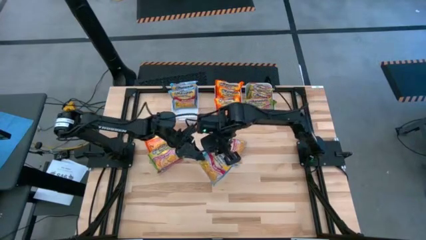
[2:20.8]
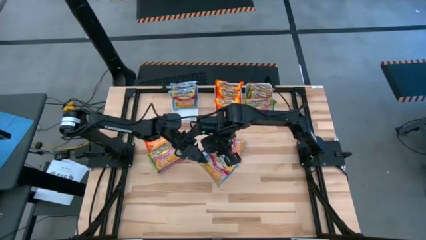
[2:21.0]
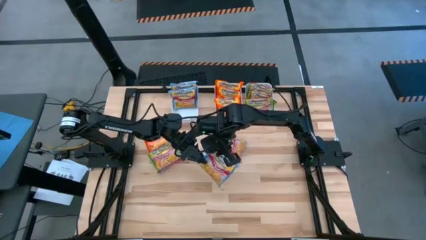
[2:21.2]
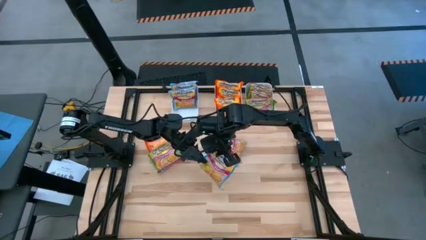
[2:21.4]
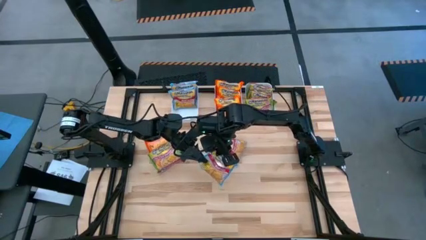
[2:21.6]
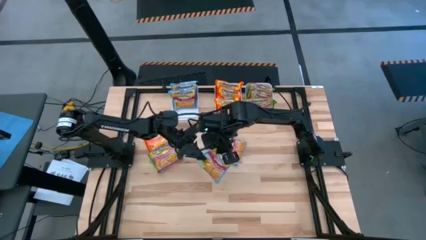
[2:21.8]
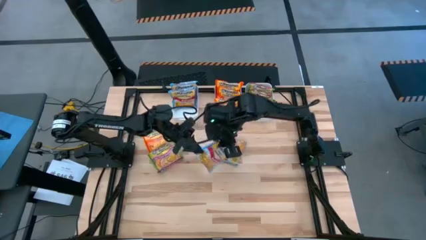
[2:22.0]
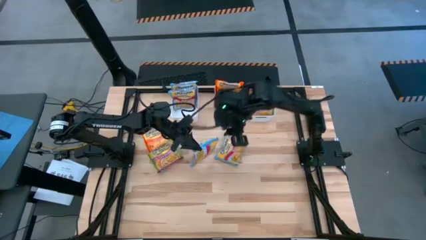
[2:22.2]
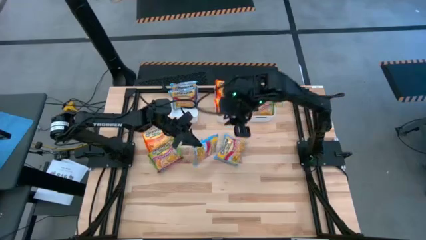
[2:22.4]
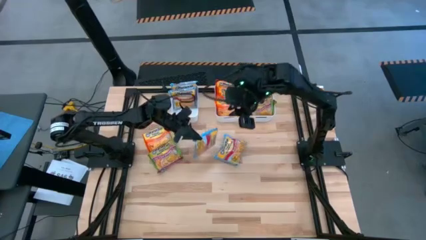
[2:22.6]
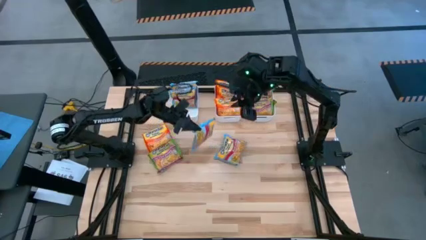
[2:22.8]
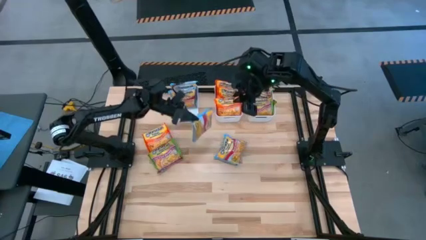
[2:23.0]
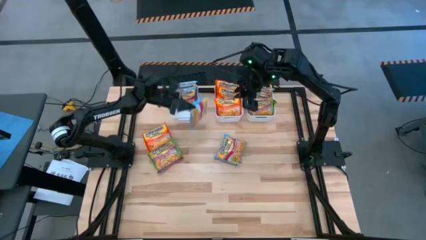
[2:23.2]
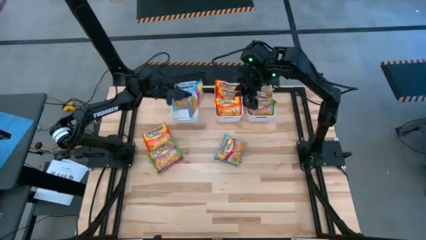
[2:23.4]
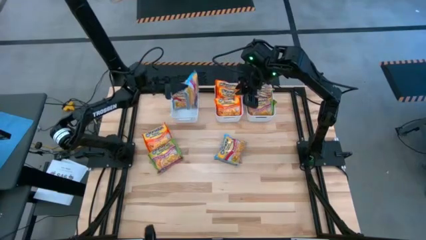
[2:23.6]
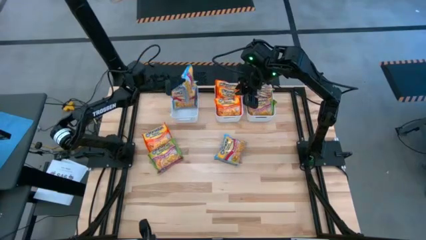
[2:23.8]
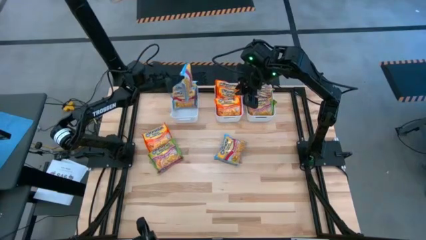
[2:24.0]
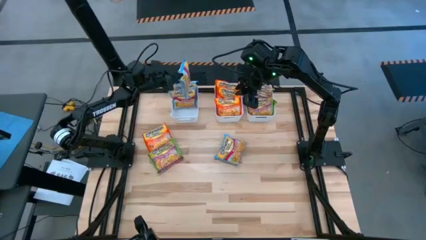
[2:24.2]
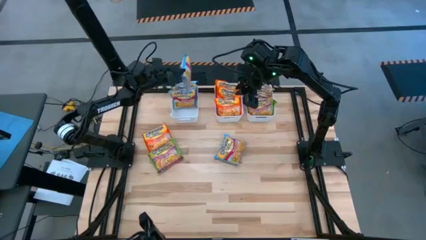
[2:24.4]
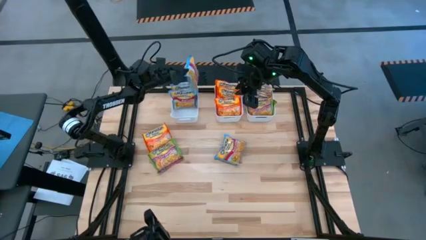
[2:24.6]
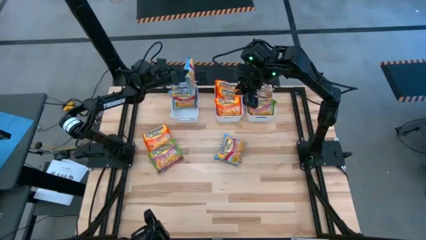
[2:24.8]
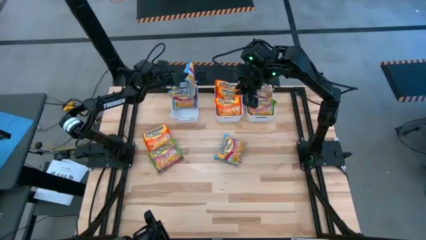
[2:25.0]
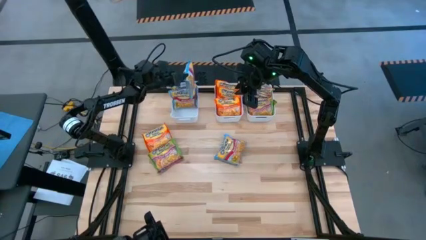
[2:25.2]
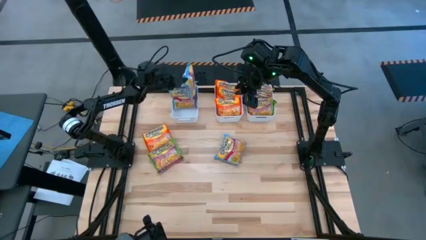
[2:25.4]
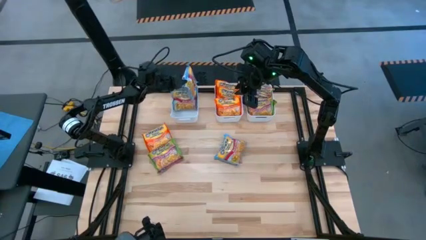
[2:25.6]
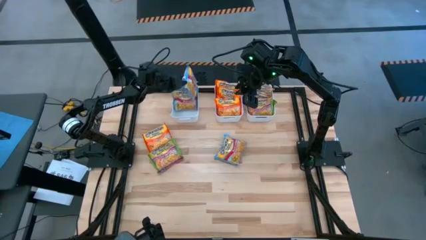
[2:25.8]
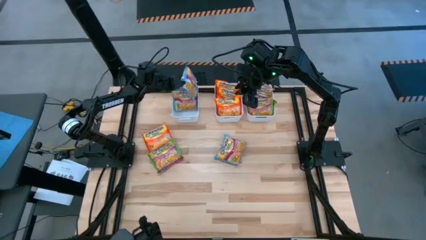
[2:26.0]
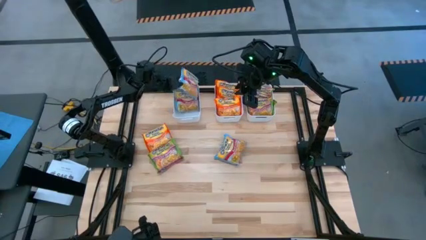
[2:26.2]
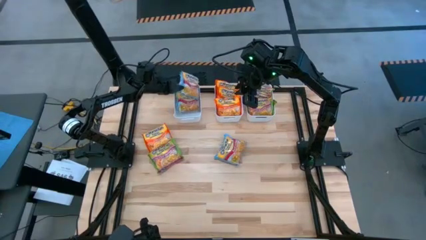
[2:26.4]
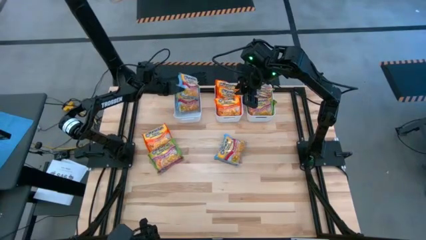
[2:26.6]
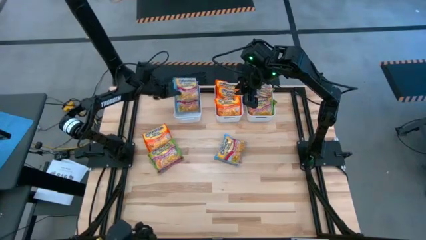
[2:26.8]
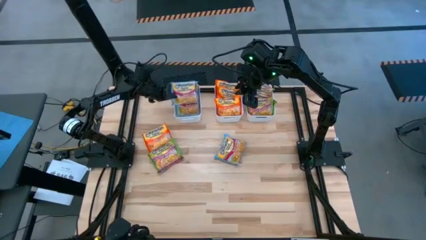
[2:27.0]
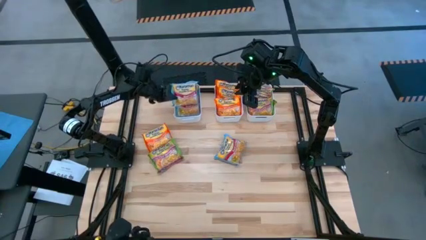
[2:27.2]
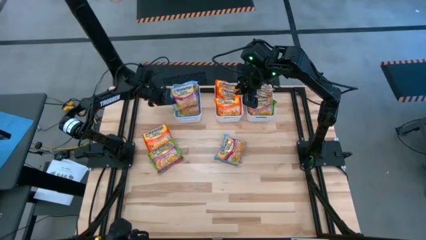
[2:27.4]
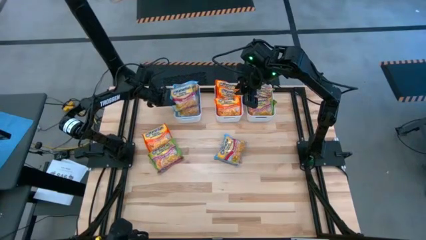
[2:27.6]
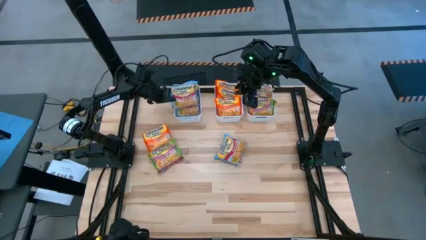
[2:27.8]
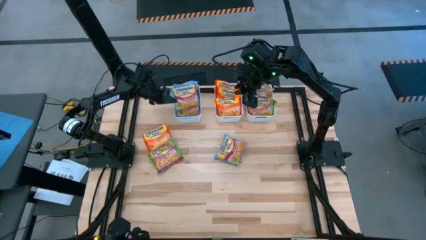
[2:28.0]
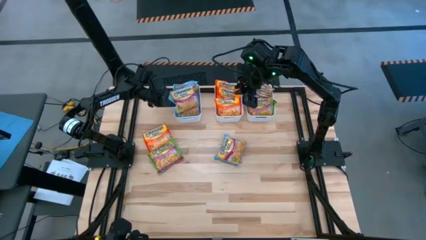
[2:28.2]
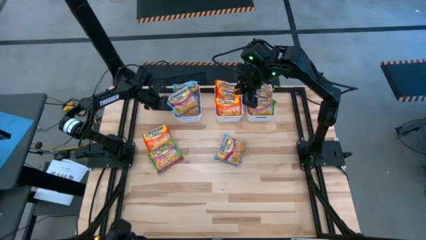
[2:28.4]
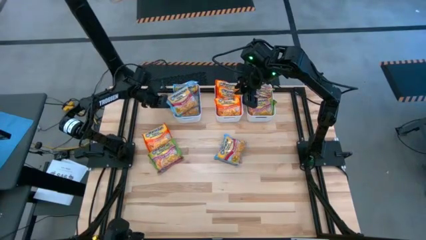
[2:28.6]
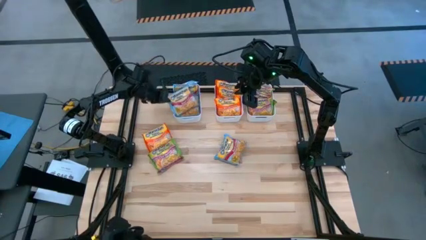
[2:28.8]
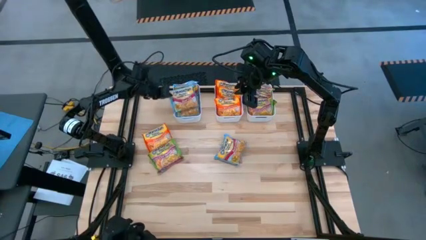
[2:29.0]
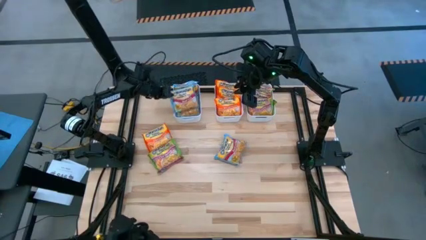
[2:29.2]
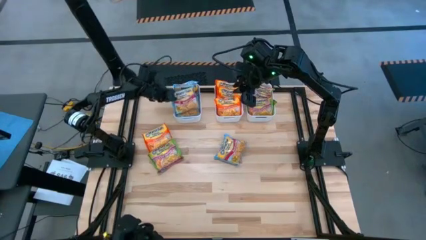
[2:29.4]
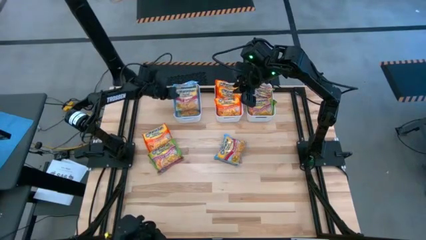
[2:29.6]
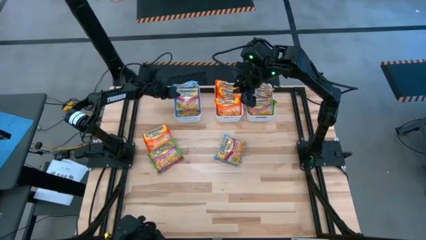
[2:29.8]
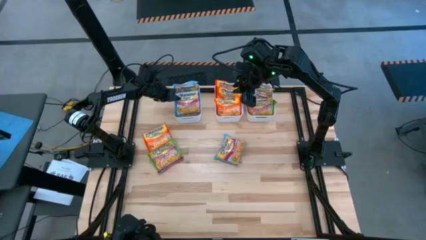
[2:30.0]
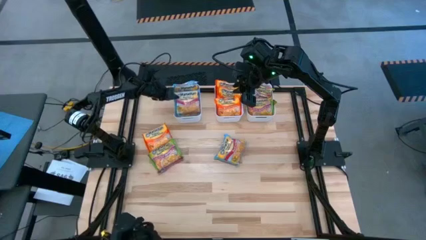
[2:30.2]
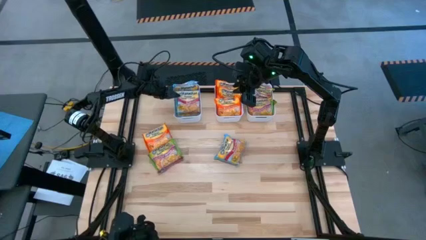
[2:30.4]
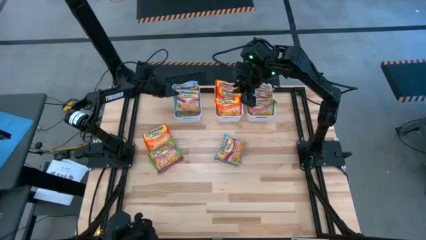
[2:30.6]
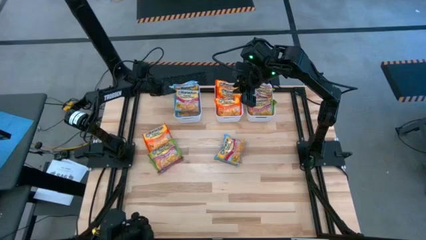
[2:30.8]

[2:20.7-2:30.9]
Task: Sort Maruchan noodles
Put the blue noodle pack into the left white bin
